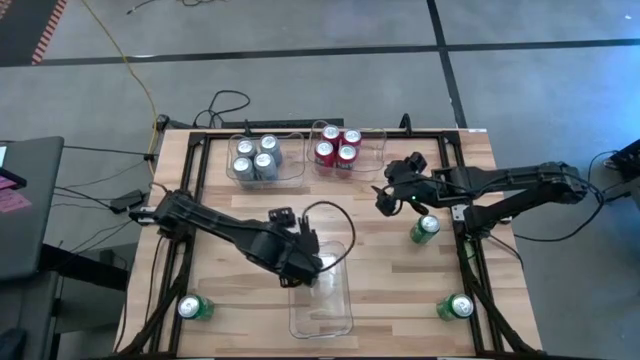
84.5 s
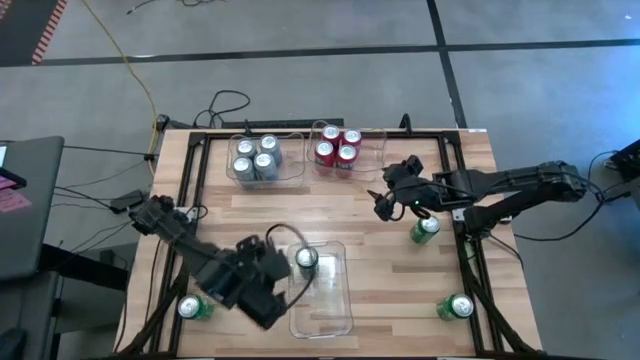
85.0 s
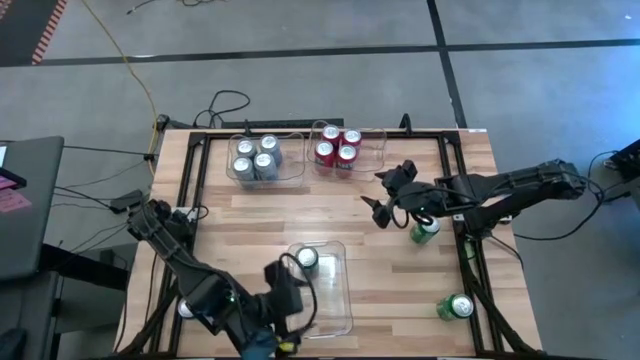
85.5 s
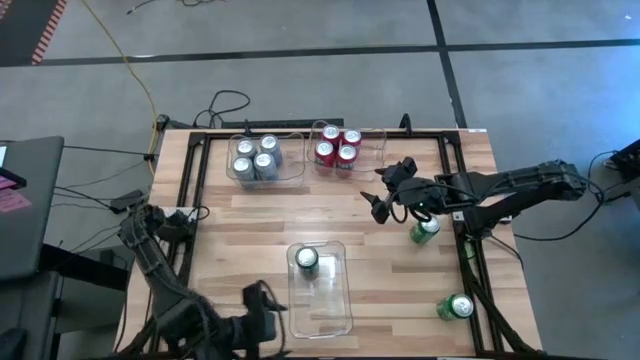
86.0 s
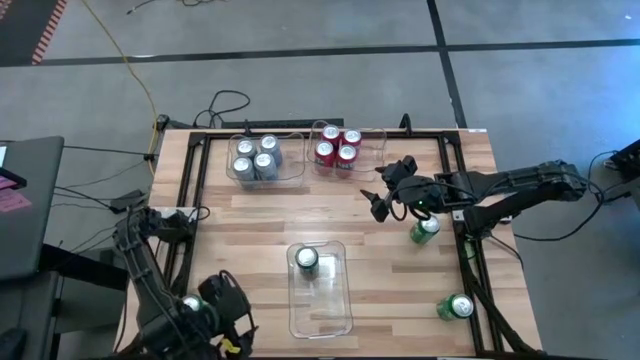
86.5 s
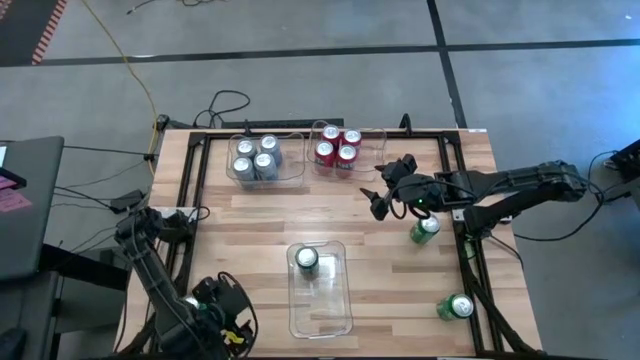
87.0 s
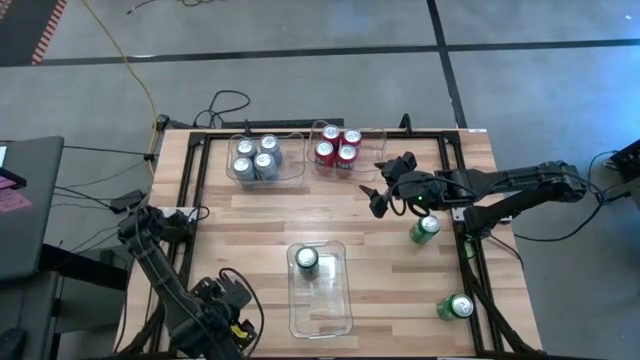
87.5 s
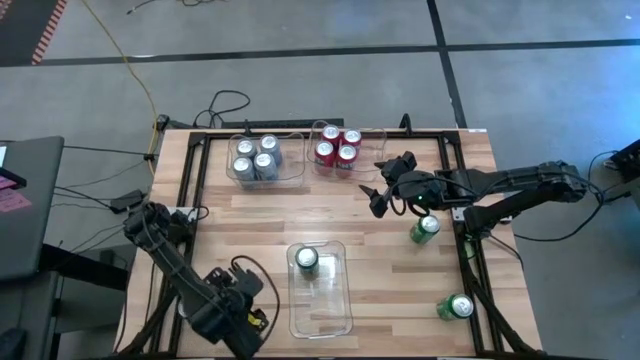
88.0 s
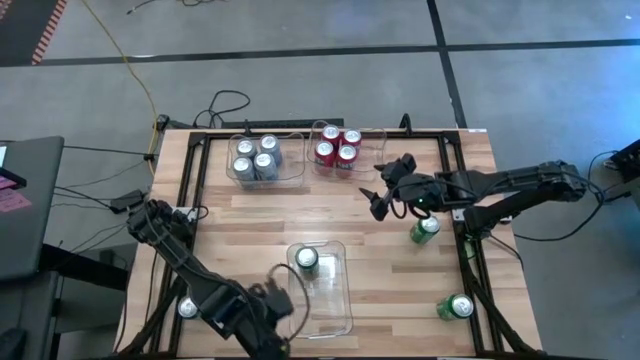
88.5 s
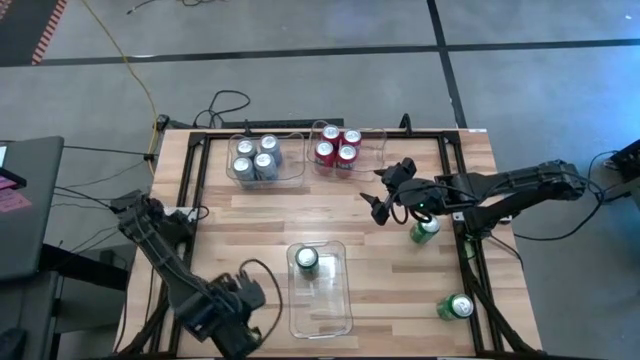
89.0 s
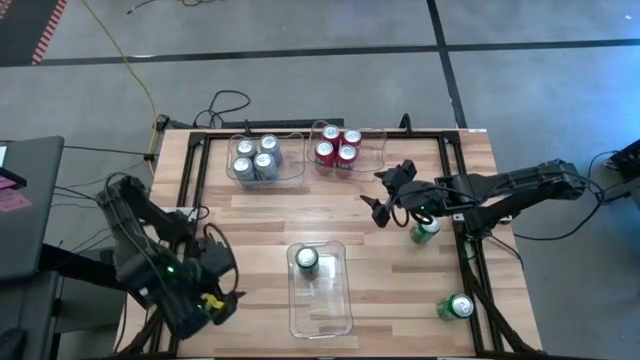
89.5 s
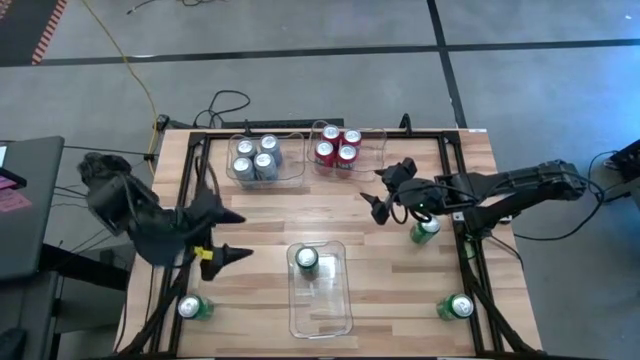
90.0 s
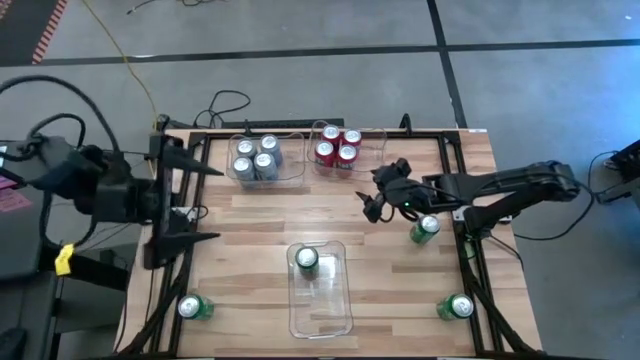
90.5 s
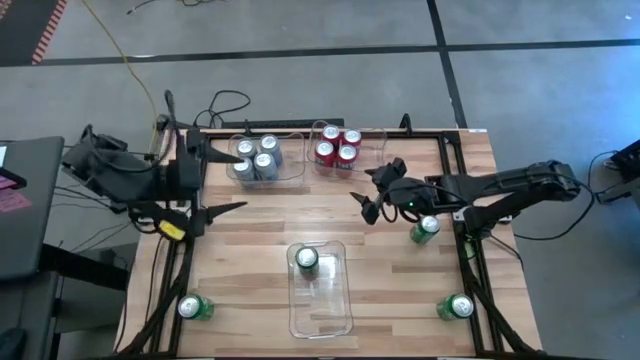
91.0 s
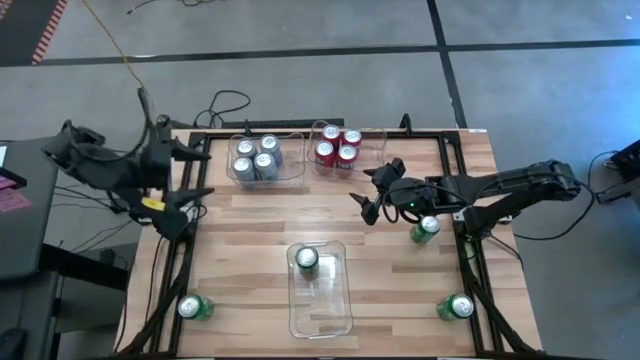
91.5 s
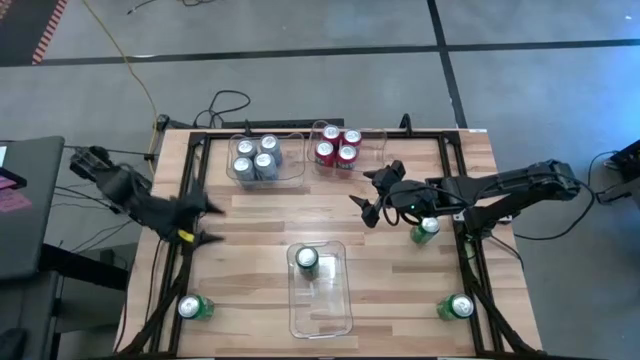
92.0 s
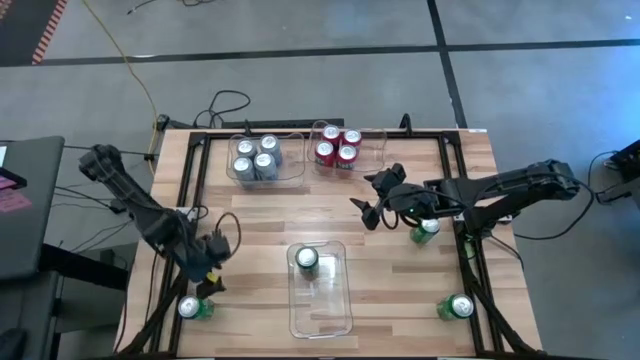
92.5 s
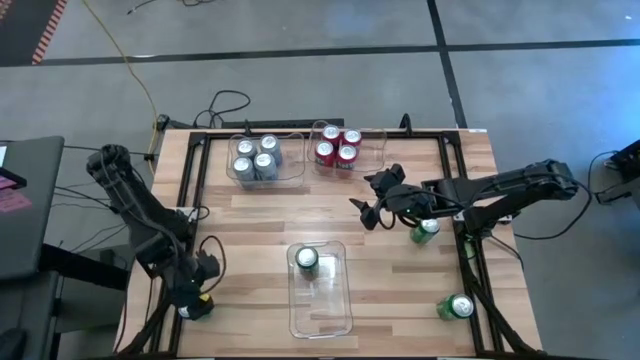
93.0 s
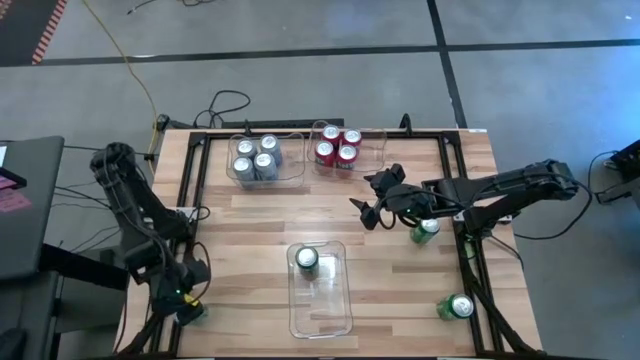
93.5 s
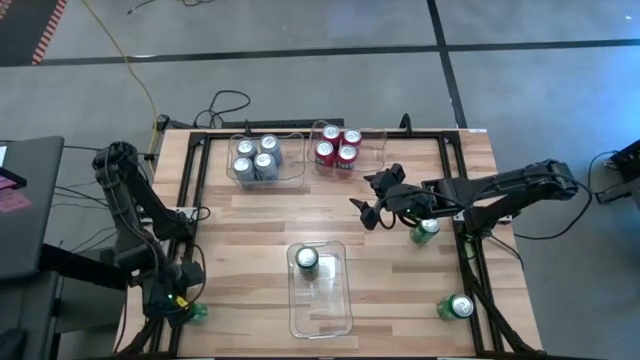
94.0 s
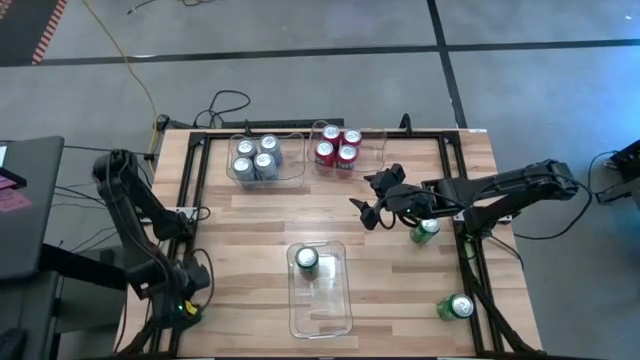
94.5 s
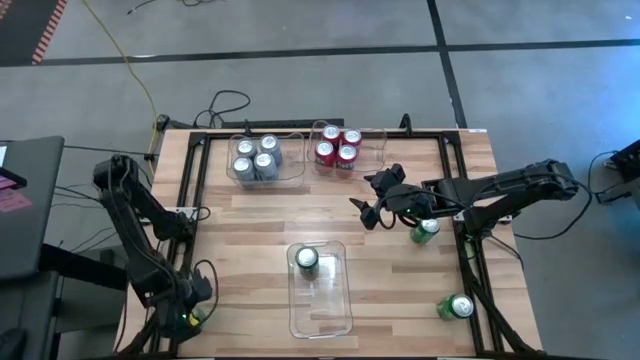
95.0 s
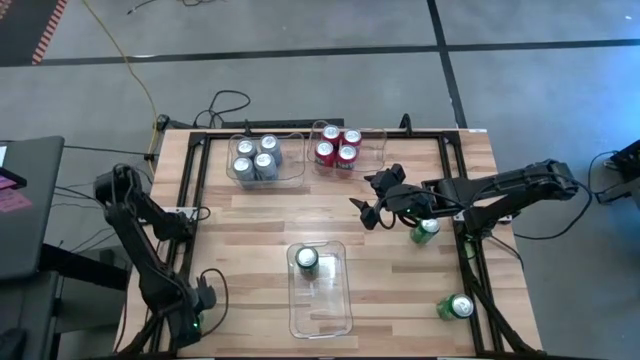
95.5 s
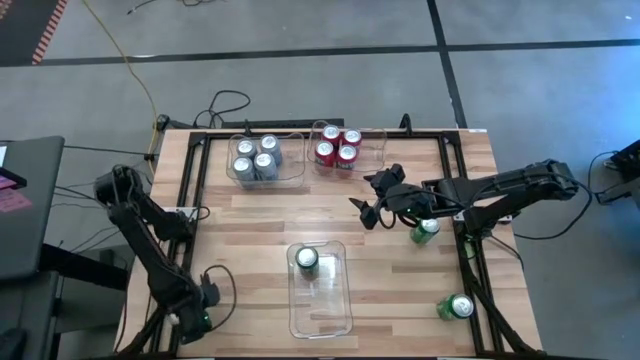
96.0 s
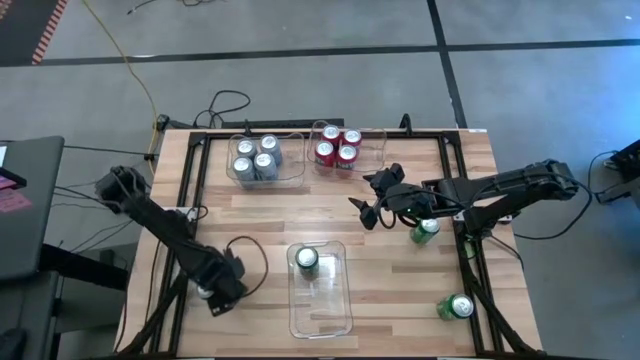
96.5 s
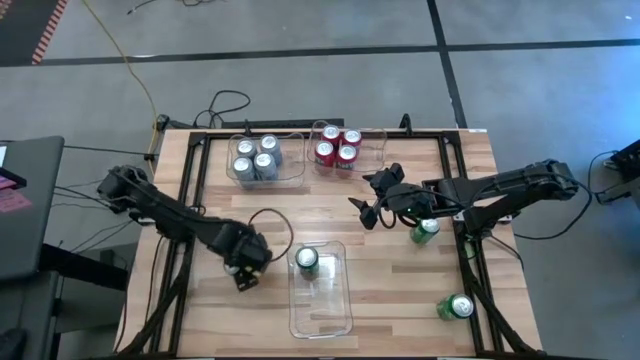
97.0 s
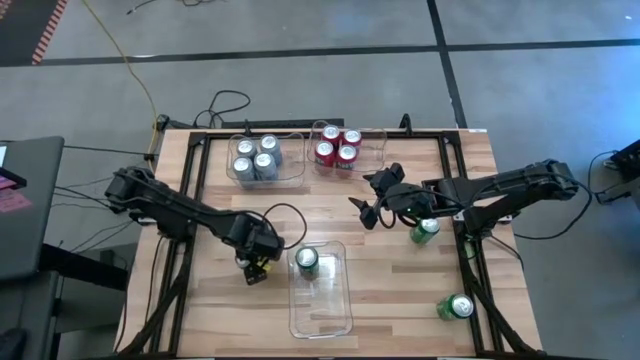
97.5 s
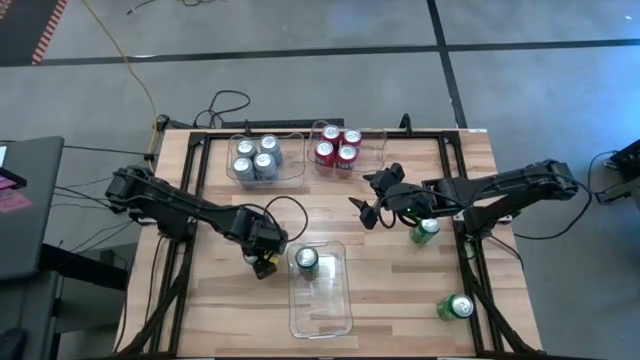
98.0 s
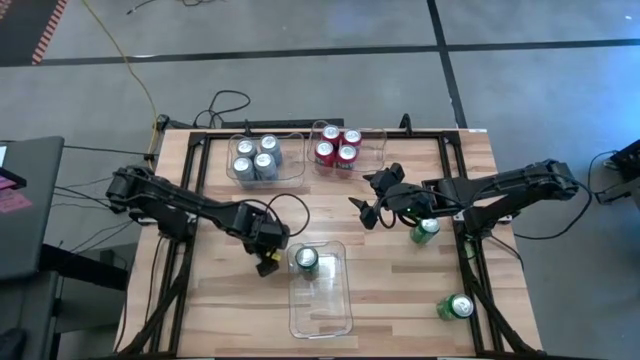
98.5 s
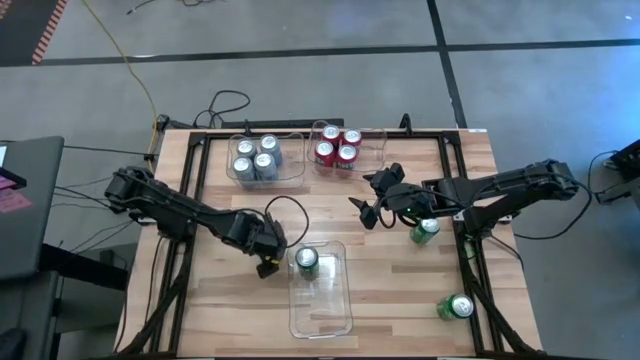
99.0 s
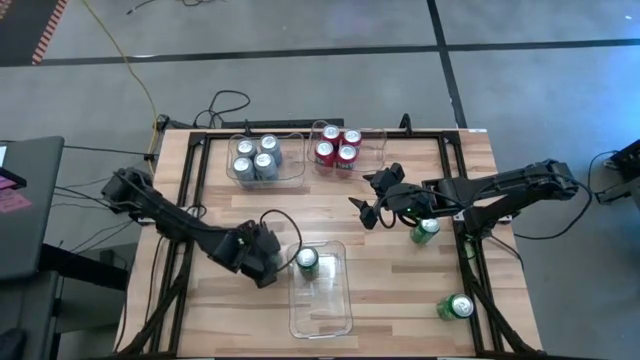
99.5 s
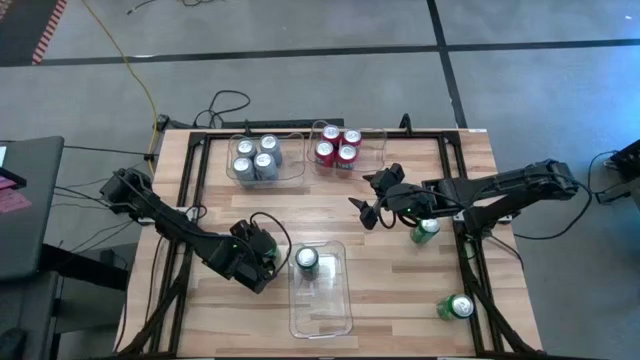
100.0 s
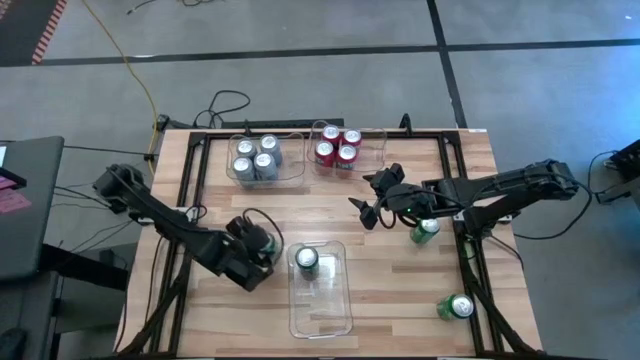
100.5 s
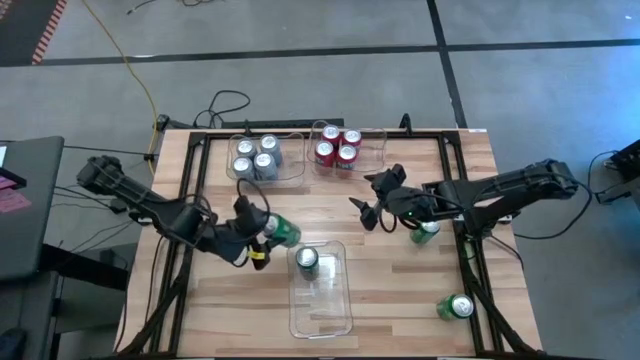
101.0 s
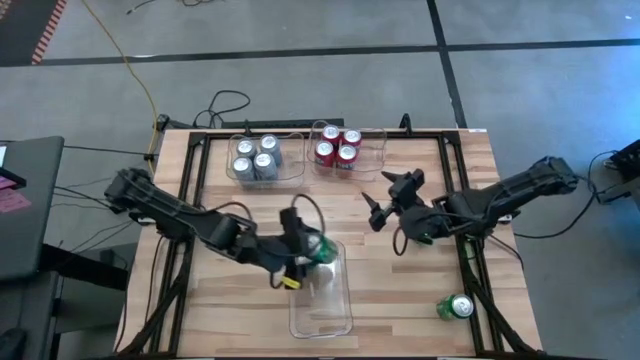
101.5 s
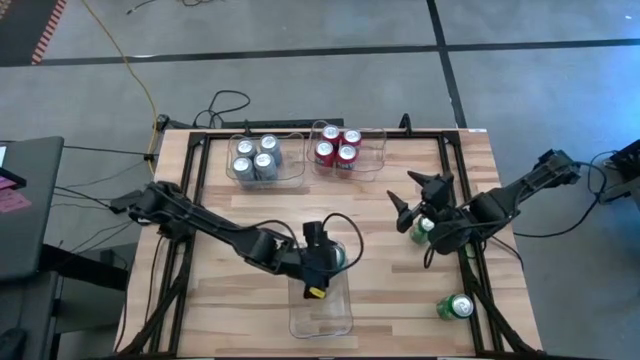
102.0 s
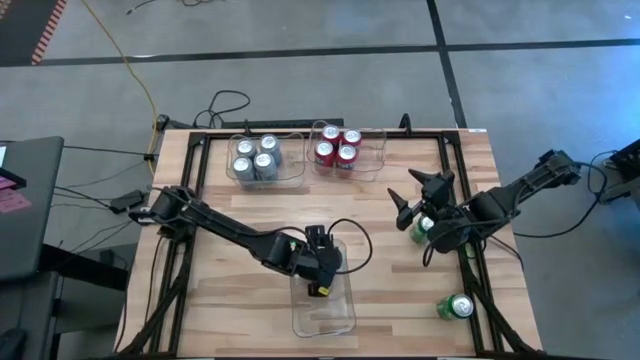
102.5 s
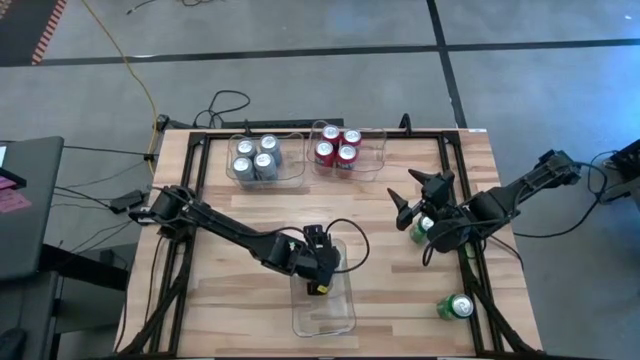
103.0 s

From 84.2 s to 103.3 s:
Task: Sort soda cans
Put the bottom left green soda can into the bottom transparent bin
